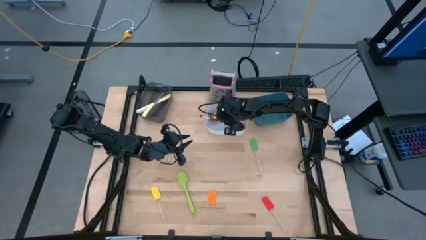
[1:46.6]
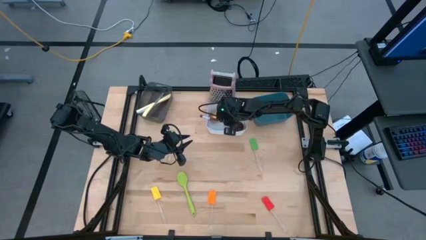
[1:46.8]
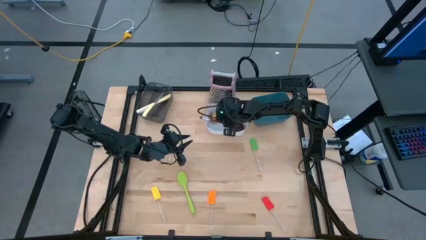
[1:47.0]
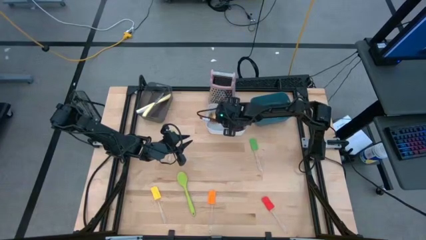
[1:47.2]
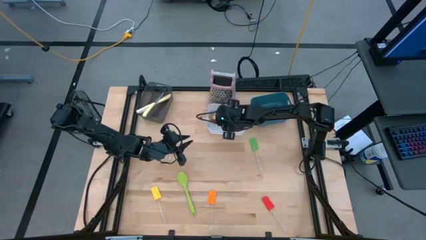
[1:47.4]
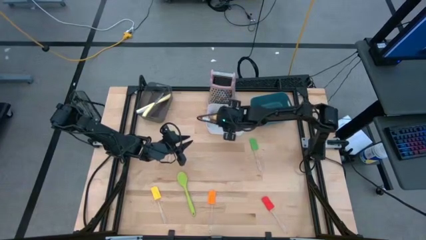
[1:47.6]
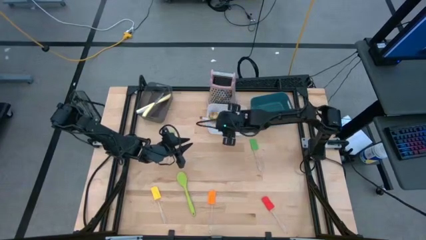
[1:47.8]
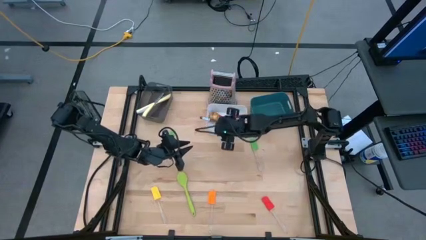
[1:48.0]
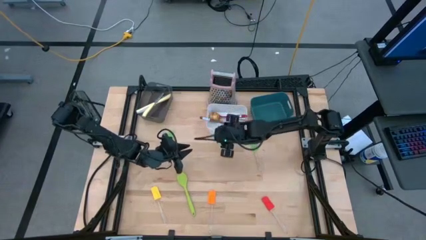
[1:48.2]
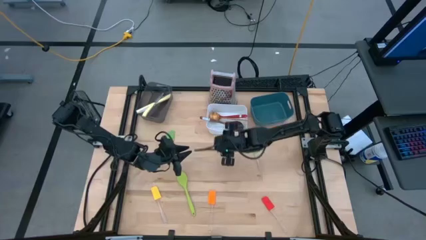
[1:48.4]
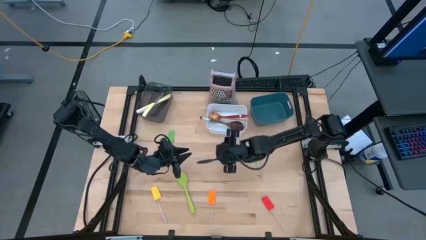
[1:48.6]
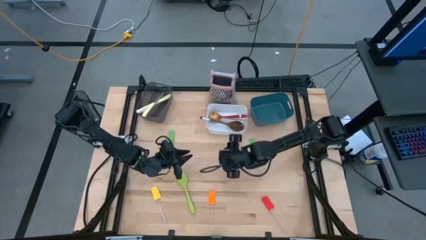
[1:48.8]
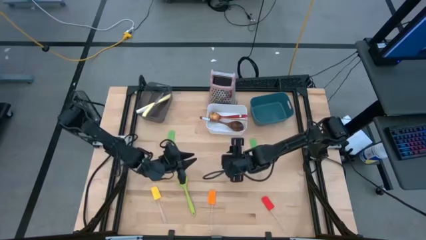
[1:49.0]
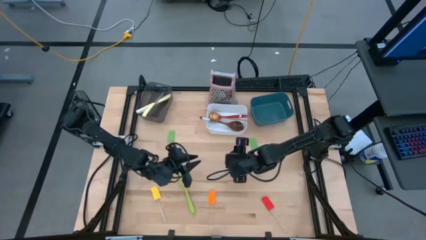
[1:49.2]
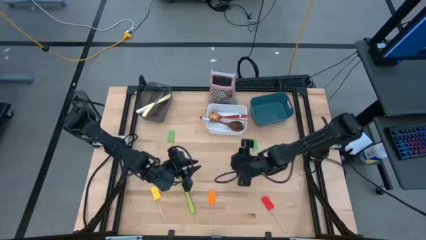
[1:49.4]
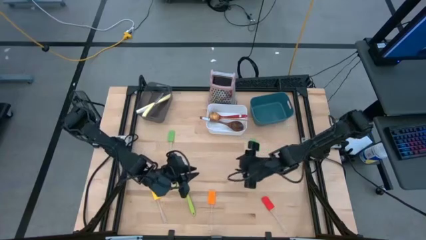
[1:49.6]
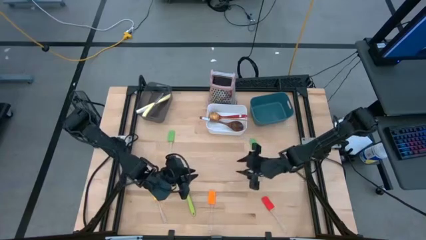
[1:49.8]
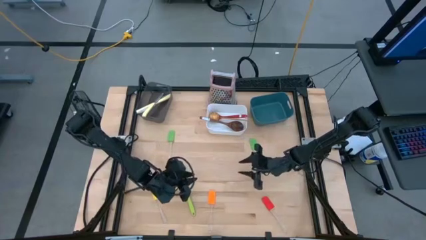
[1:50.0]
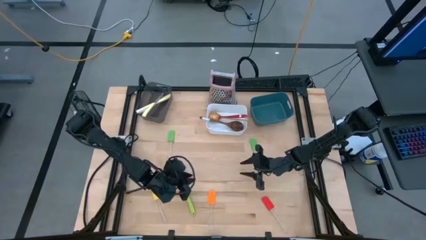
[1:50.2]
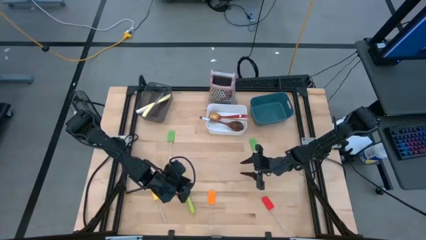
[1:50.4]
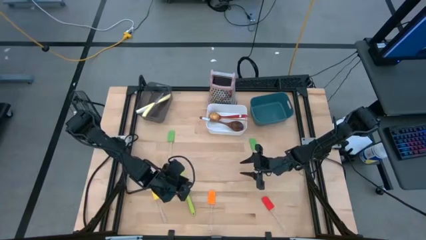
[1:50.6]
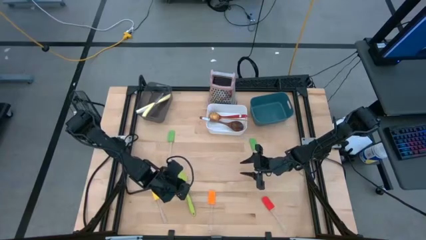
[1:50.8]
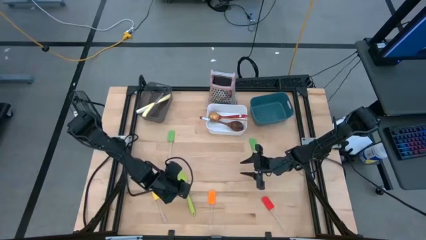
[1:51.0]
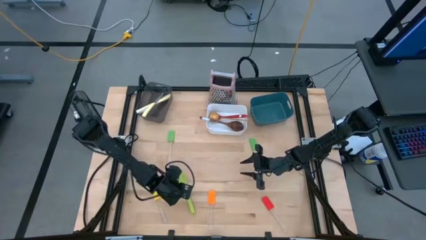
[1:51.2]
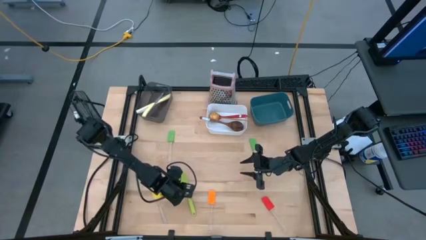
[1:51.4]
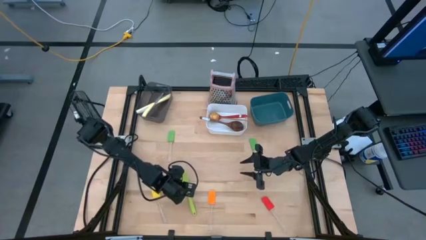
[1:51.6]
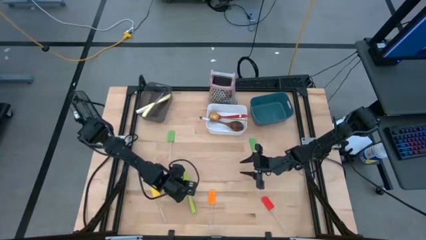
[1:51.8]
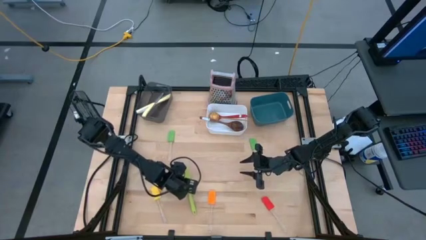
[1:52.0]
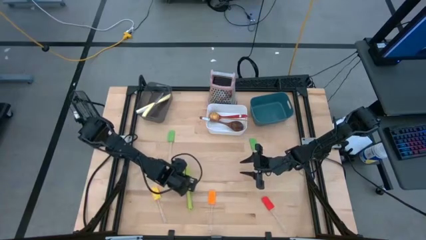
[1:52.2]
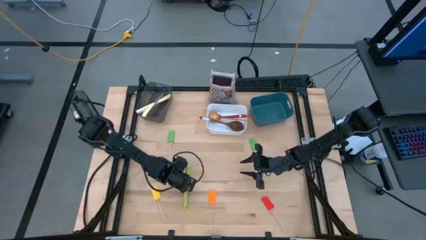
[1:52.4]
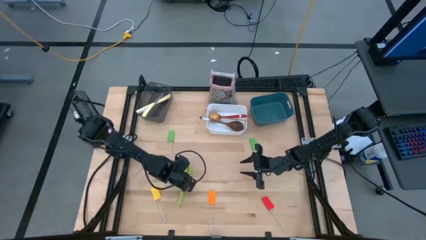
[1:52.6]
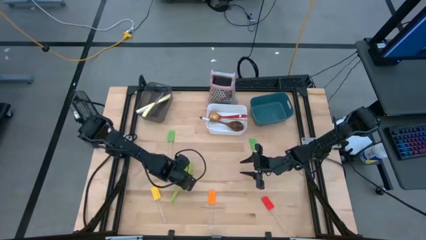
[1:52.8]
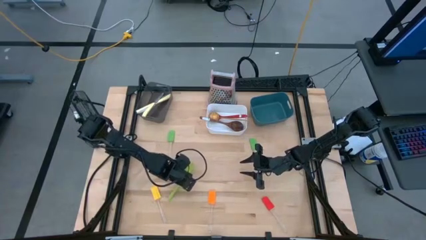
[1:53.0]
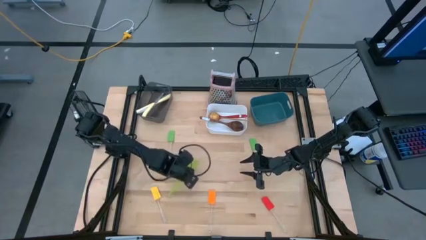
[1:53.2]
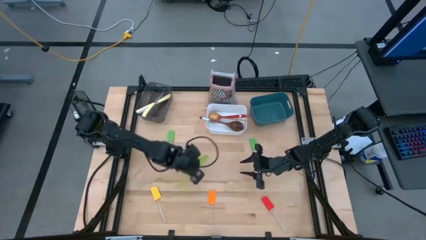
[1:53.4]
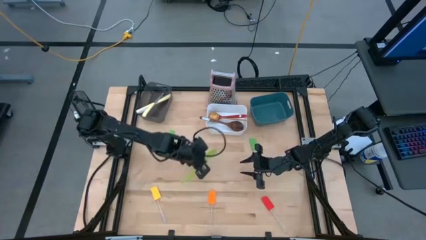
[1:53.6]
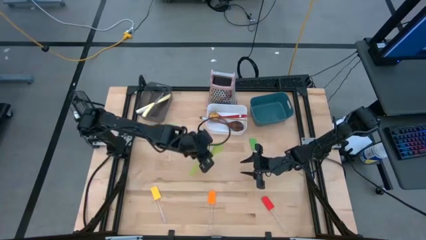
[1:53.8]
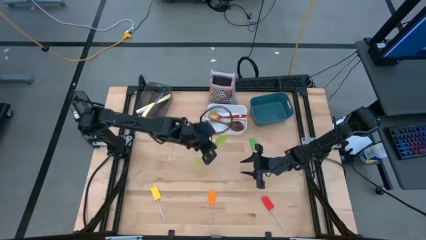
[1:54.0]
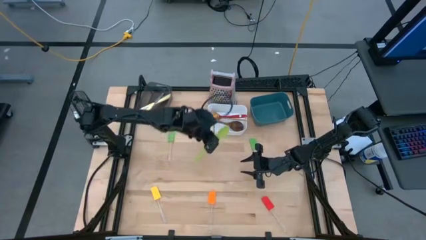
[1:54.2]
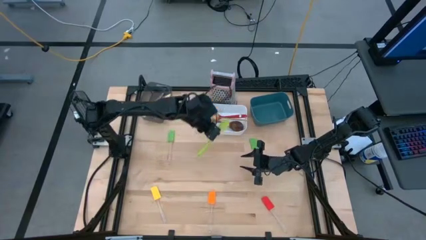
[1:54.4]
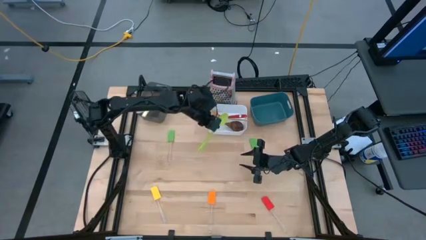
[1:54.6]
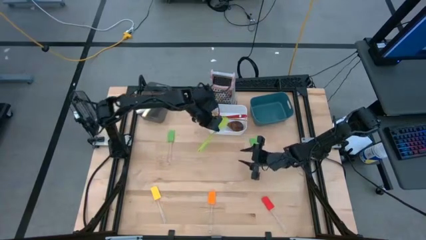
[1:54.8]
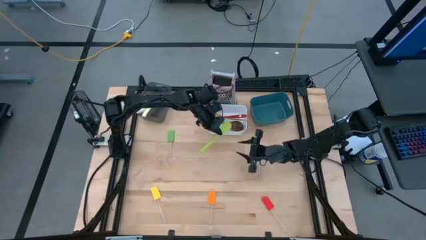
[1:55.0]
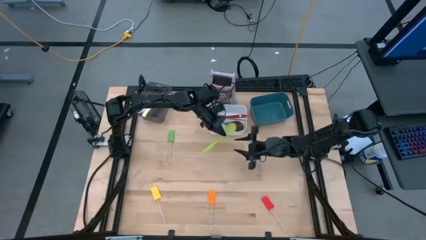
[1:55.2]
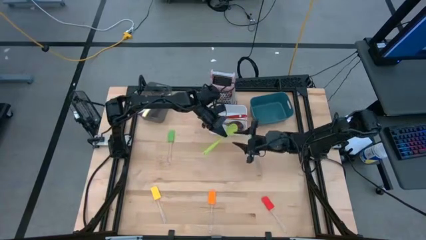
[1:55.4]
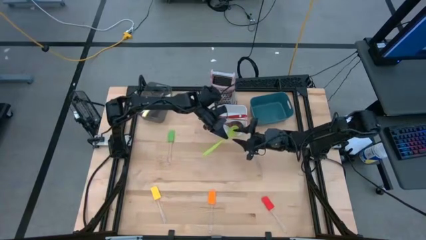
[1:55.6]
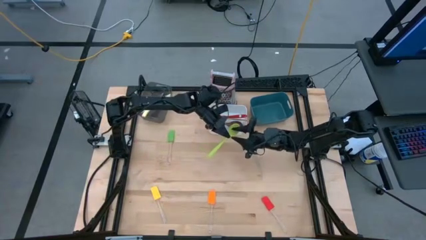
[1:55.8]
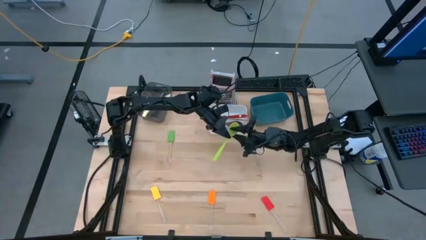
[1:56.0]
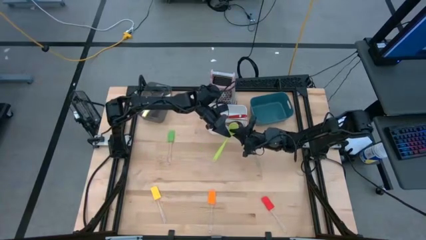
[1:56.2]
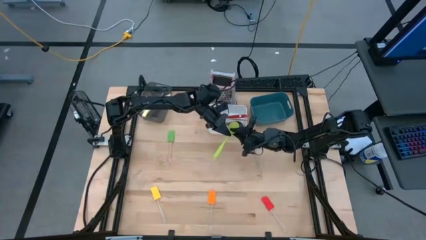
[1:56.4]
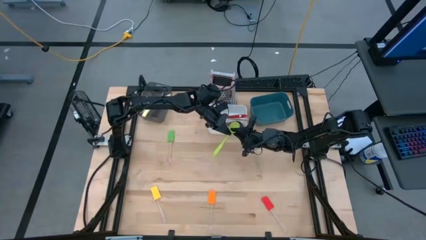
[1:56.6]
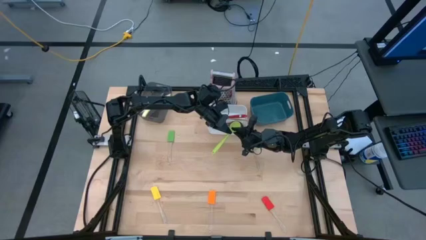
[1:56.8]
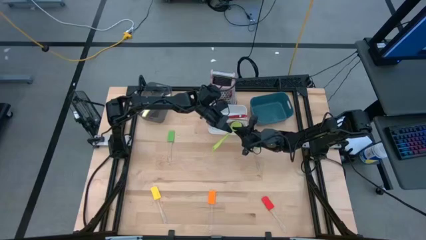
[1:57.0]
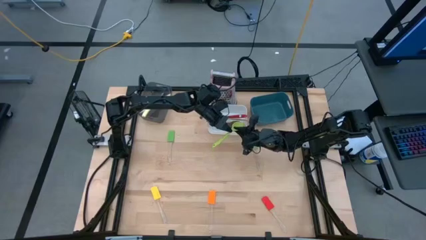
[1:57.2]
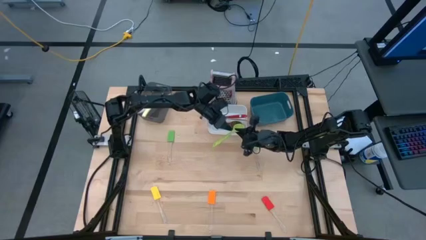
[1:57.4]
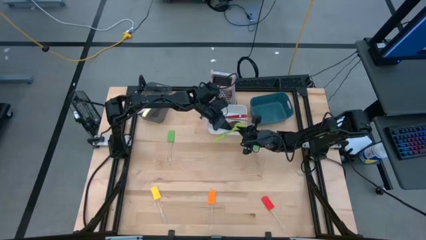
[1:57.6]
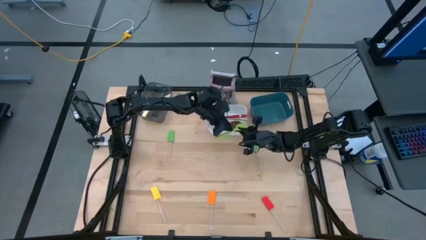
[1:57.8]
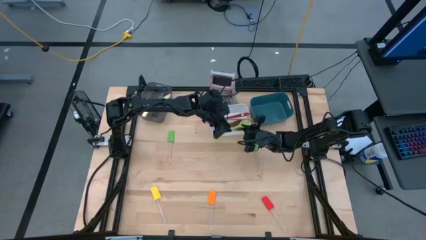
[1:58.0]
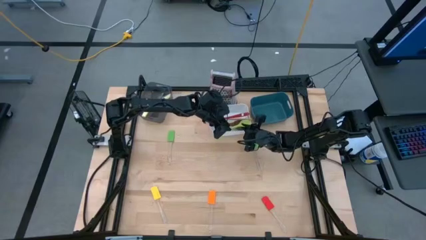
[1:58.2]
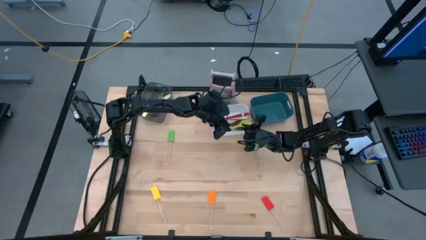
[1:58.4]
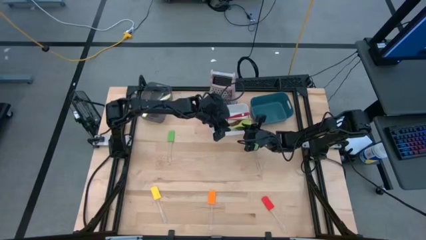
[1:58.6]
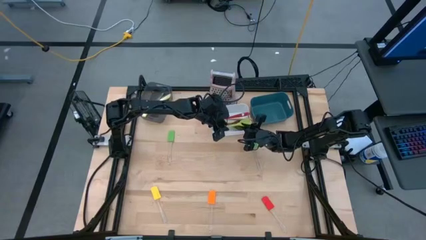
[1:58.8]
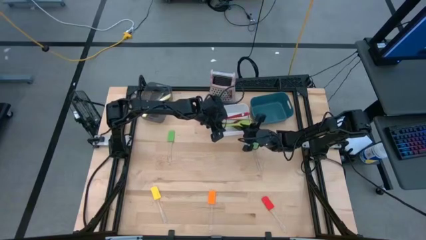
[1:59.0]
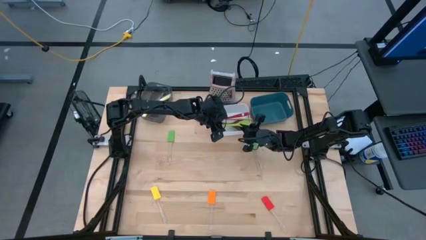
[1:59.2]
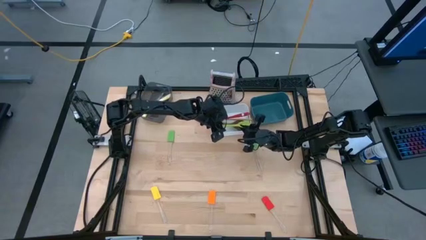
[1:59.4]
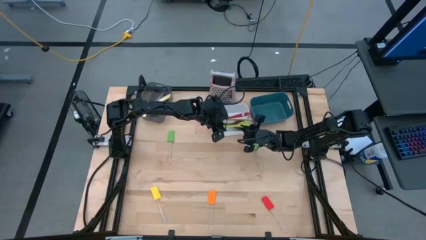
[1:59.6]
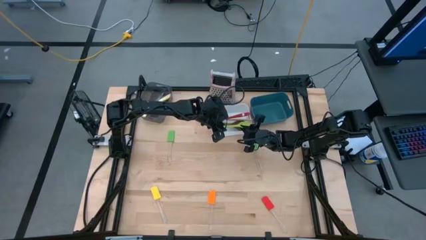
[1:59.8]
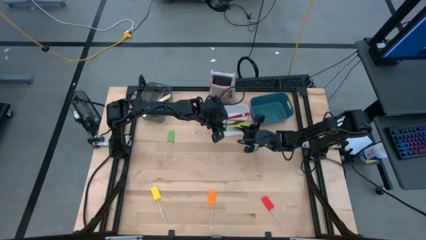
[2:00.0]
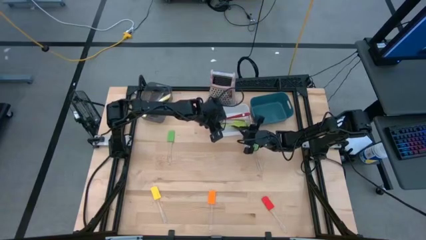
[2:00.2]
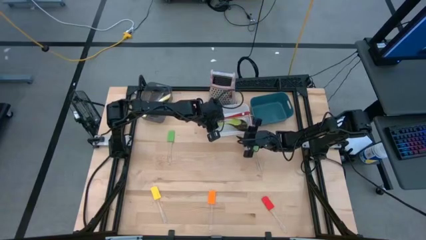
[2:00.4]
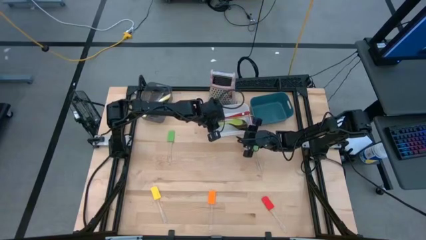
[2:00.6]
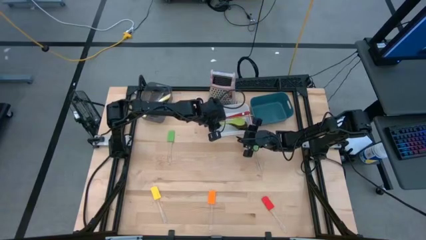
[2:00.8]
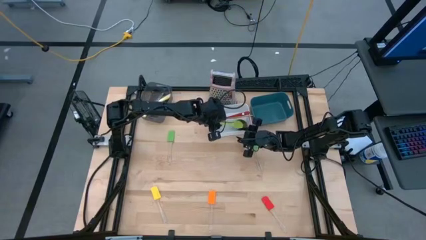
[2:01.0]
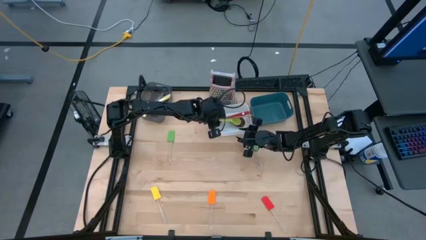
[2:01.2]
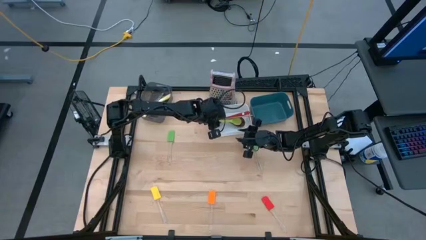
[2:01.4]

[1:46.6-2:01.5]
Task: Pick & Place Kitchen Items
Put the green spoon into the white bin

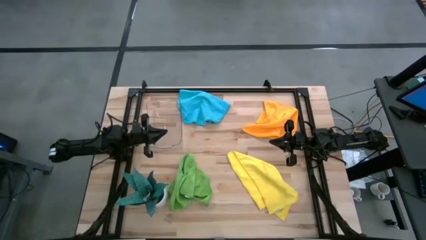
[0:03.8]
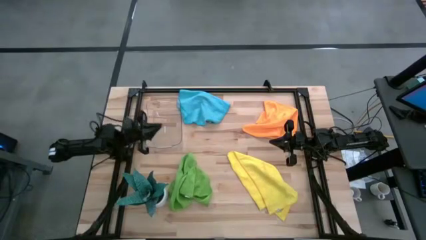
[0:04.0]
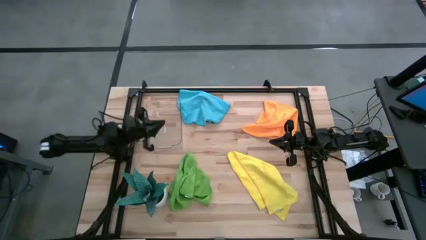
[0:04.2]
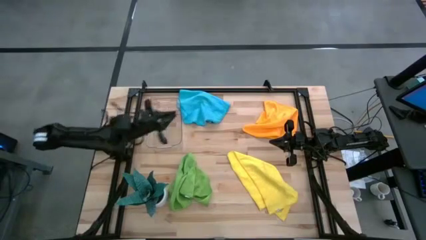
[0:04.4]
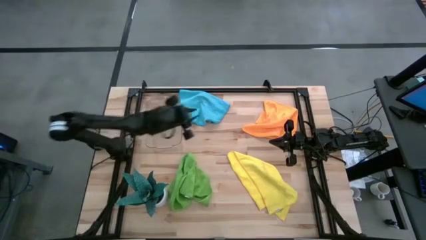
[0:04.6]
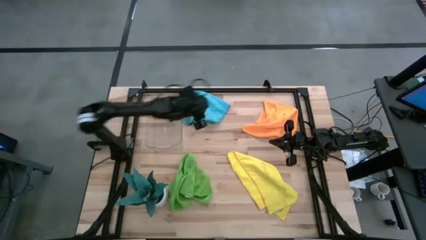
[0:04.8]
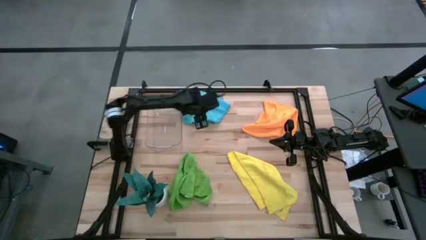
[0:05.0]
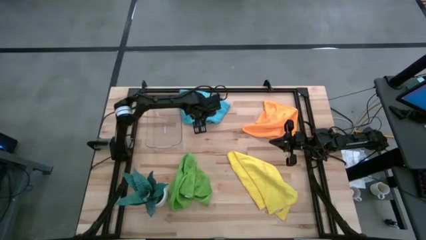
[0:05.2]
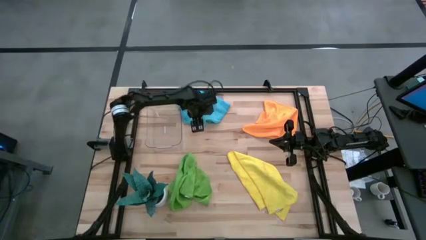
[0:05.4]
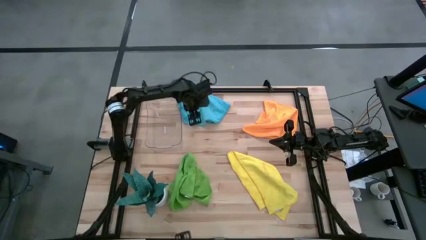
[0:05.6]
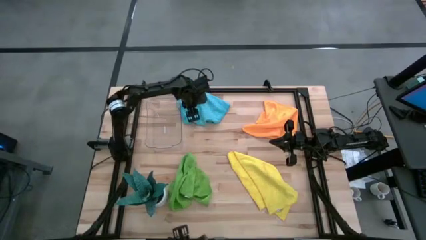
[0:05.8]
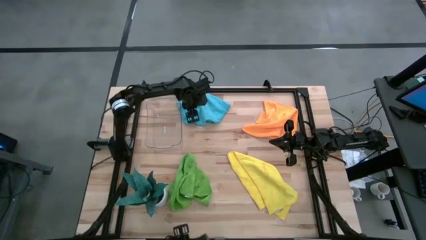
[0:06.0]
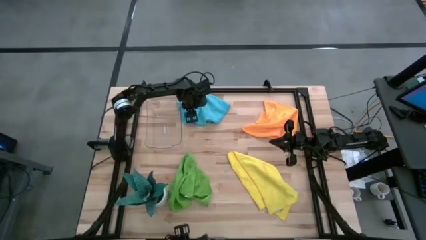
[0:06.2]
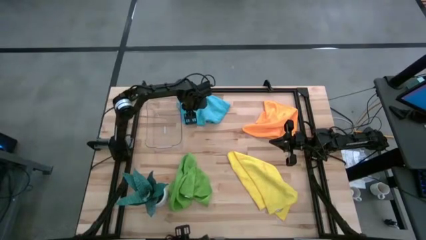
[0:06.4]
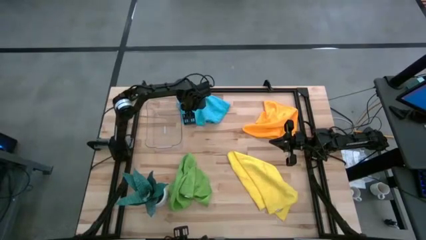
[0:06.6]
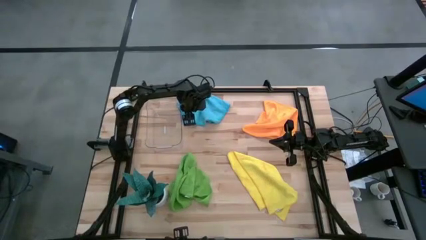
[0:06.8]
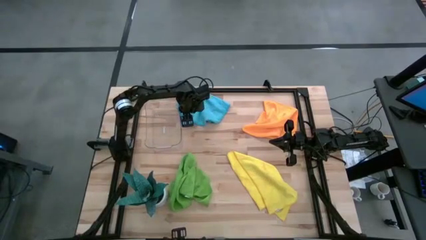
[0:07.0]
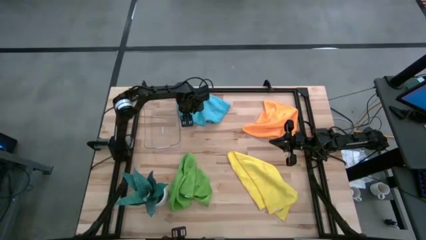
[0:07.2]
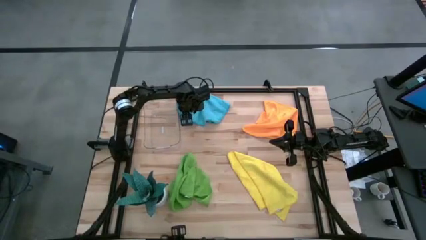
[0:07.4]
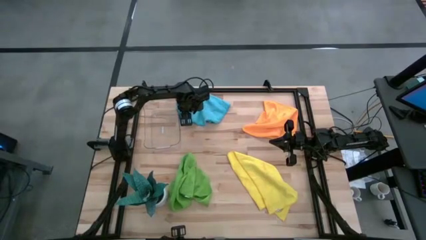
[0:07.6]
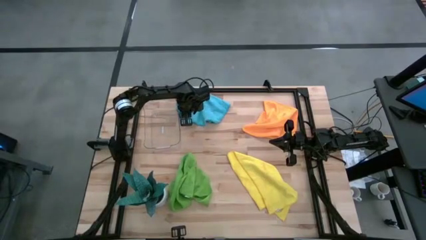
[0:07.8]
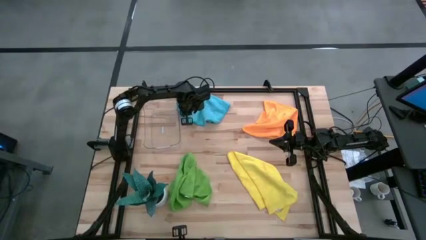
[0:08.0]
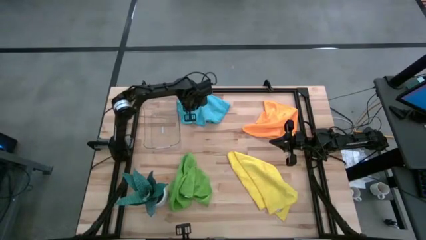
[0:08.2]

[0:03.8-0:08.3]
Task: Roll microfiber towels into tight, uniform cylinder then place into a basket
Fold the blue microfiber towel
